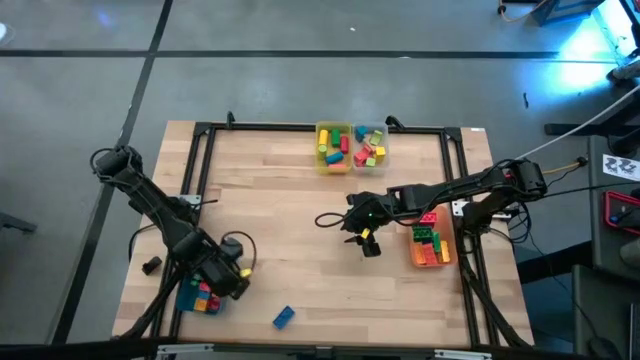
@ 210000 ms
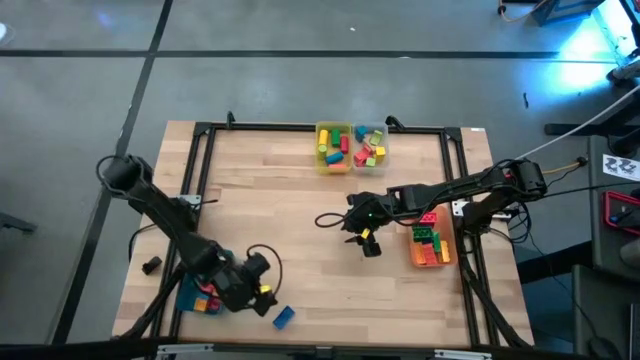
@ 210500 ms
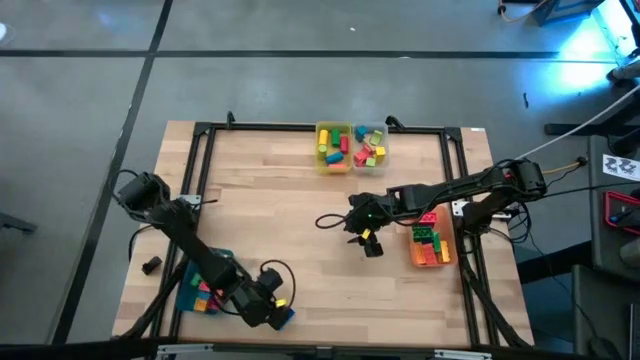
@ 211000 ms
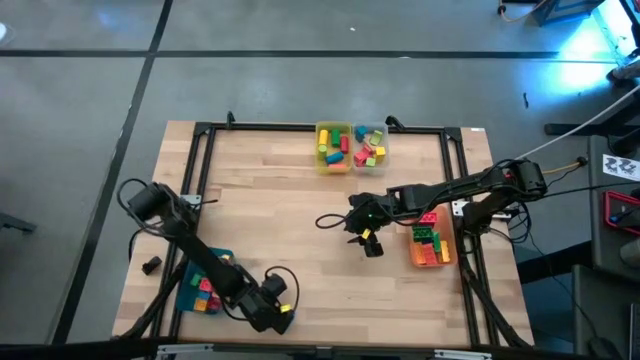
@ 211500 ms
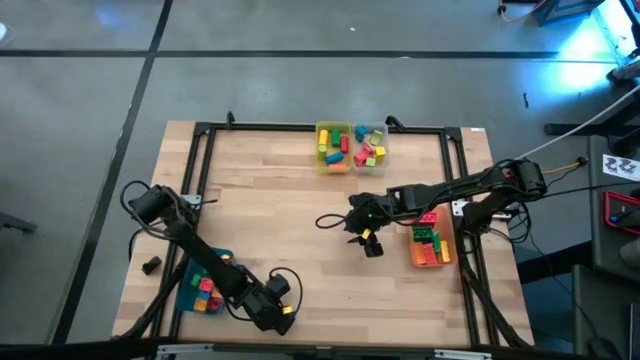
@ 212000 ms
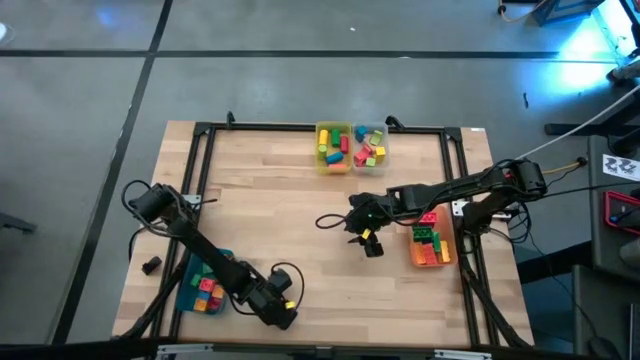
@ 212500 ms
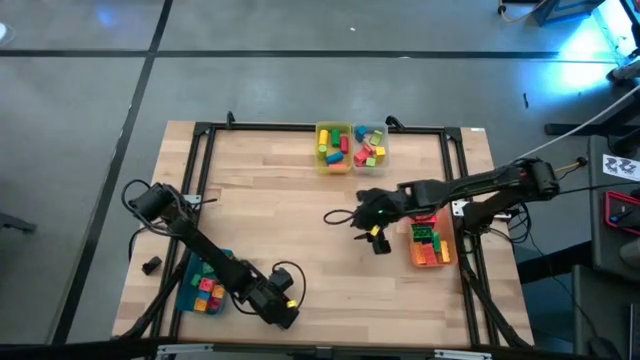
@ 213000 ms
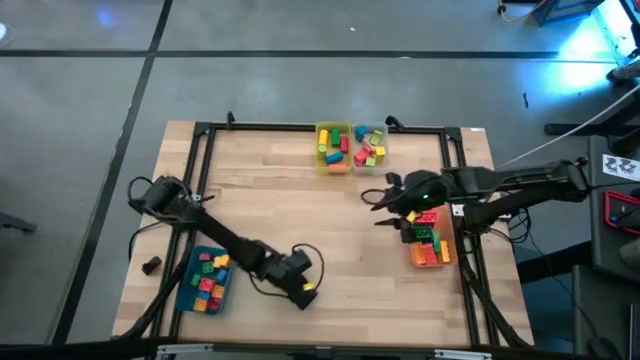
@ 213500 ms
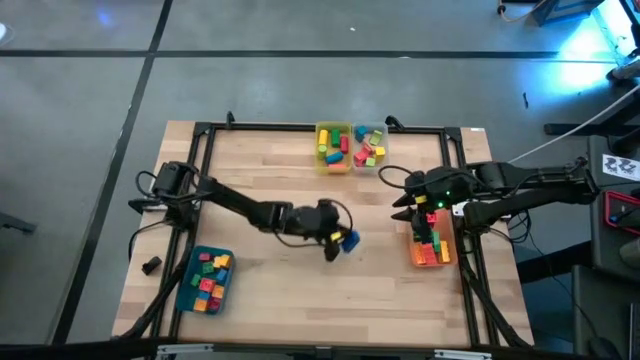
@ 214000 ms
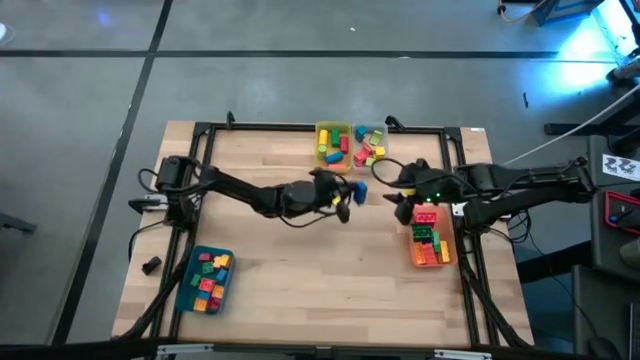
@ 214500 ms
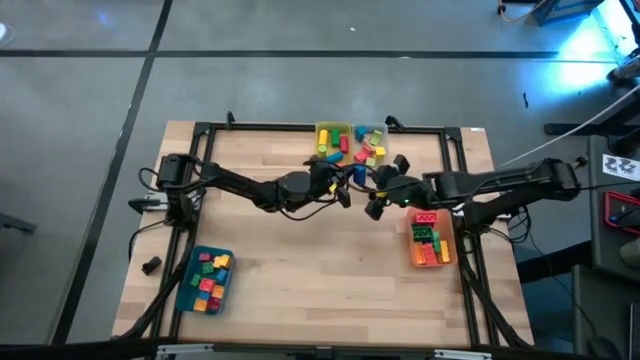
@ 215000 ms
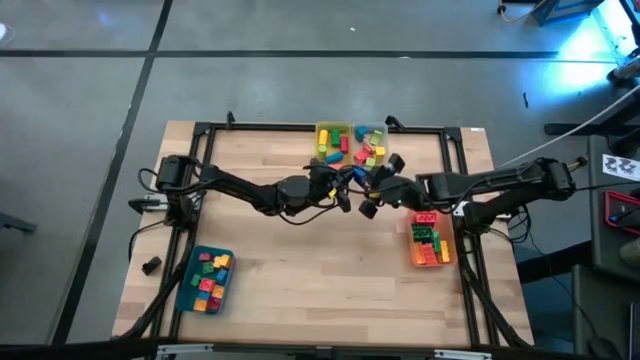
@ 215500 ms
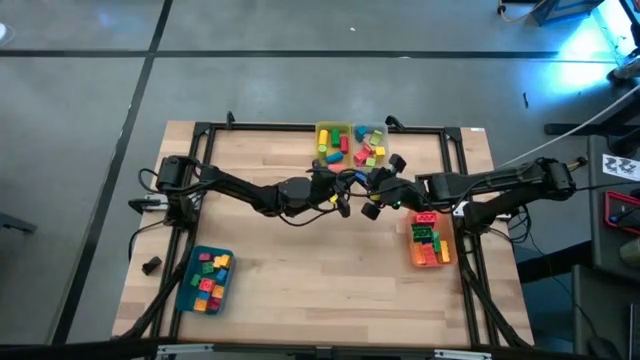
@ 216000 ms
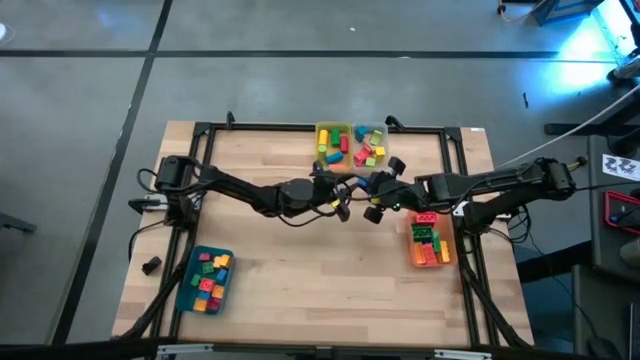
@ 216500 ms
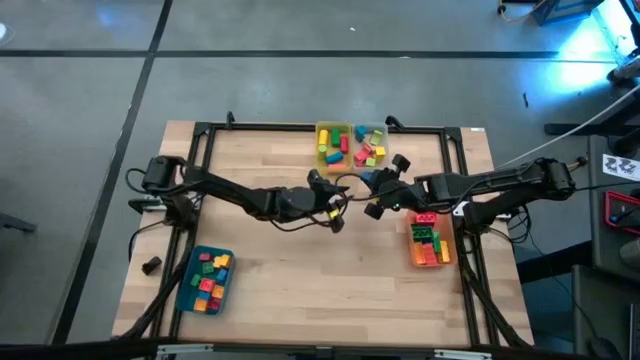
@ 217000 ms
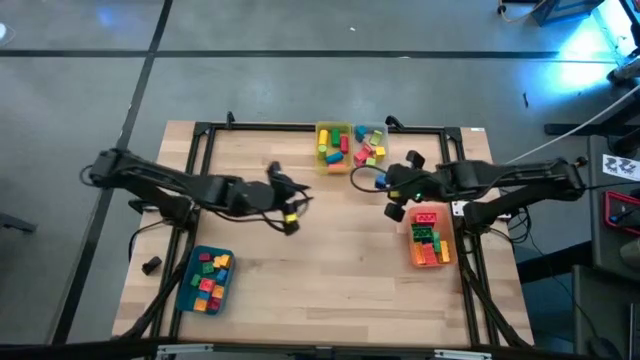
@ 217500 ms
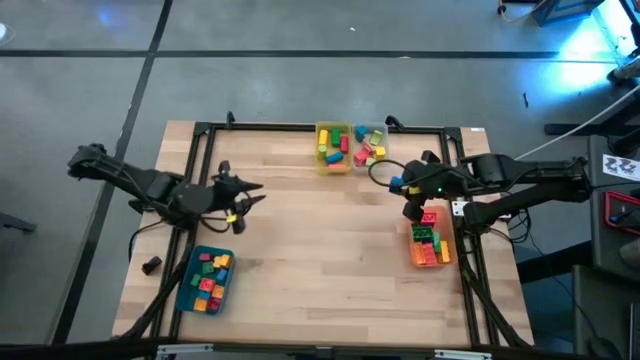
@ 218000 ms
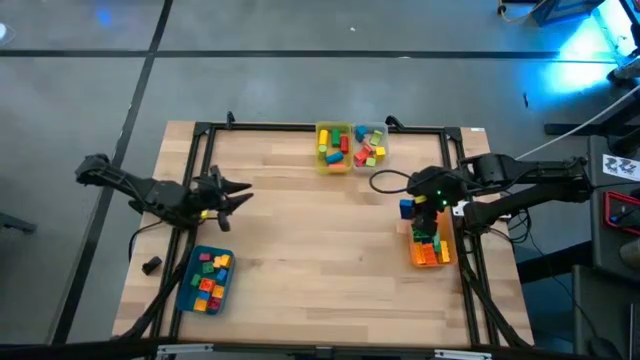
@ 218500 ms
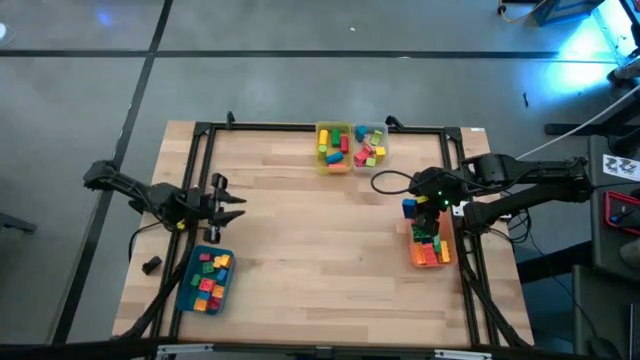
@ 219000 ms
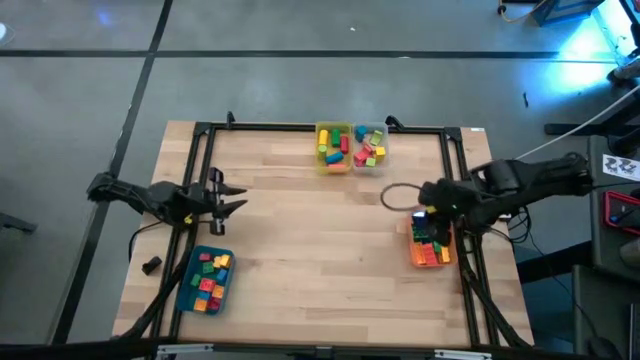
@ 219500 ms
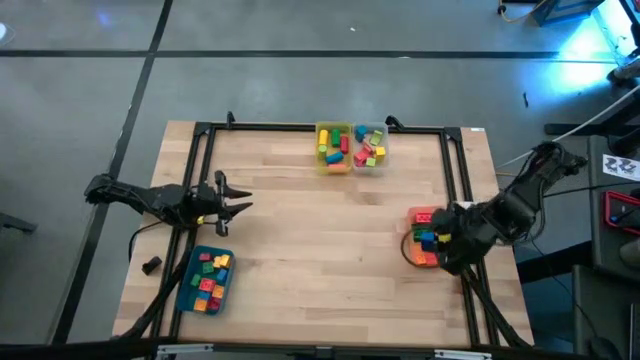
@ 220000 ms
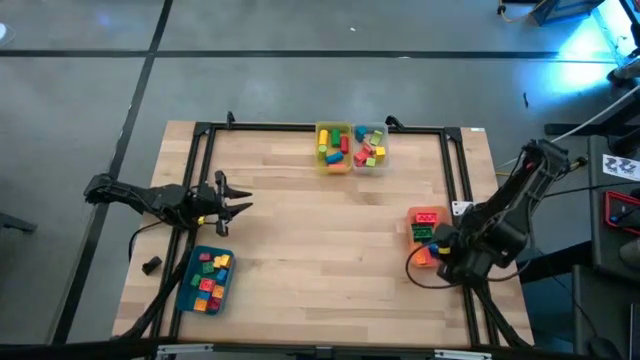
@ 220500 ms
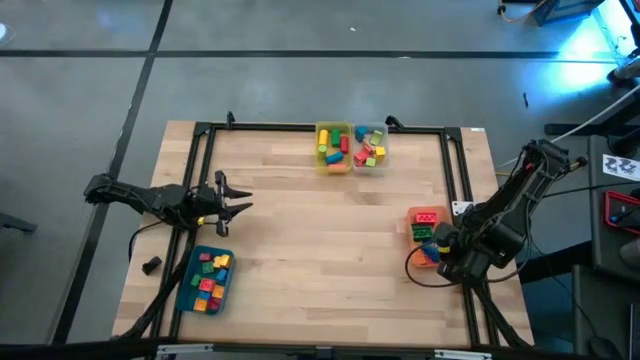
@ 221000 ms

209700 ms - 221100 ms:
Task: Sort blocks by size
Put the blue rectangular game piece into the orange bin

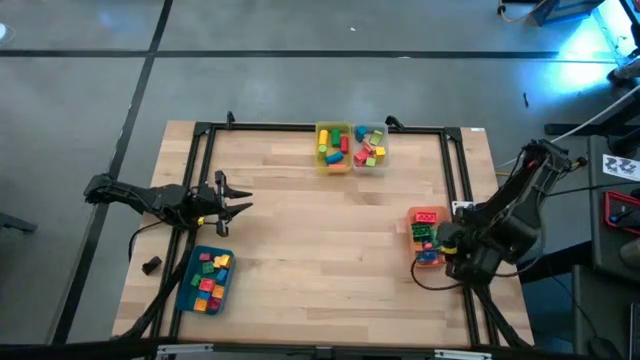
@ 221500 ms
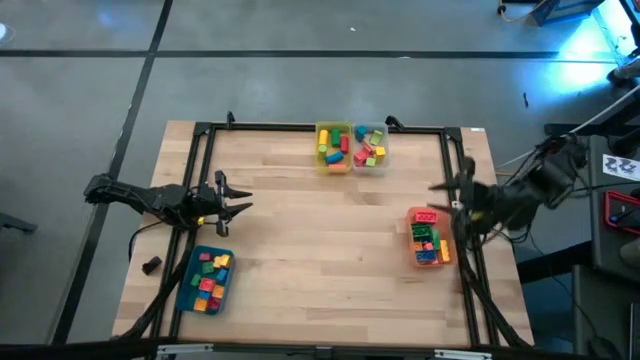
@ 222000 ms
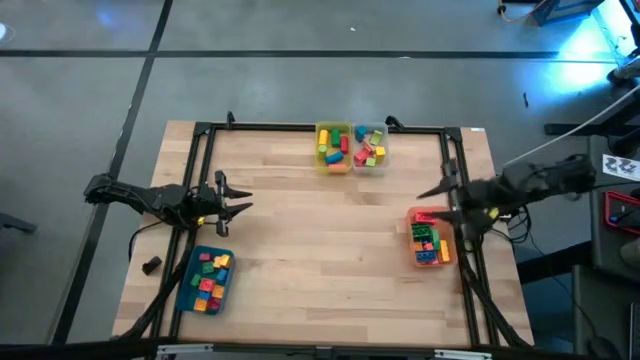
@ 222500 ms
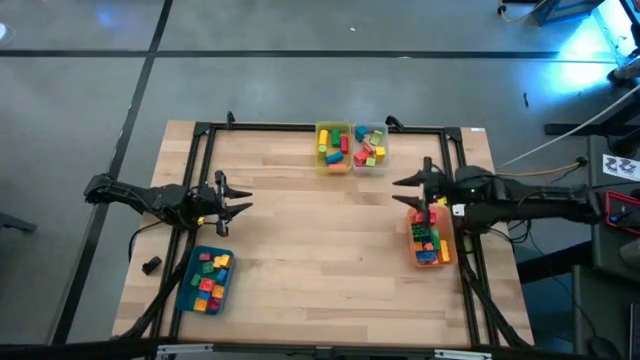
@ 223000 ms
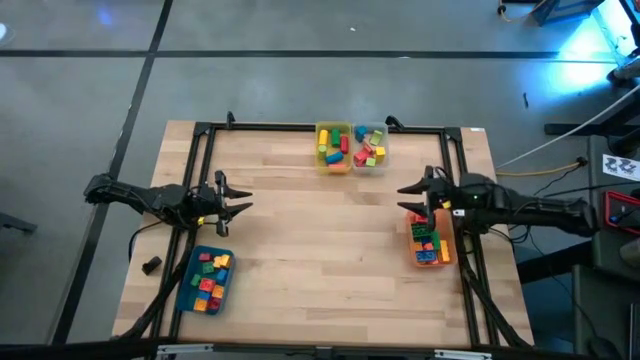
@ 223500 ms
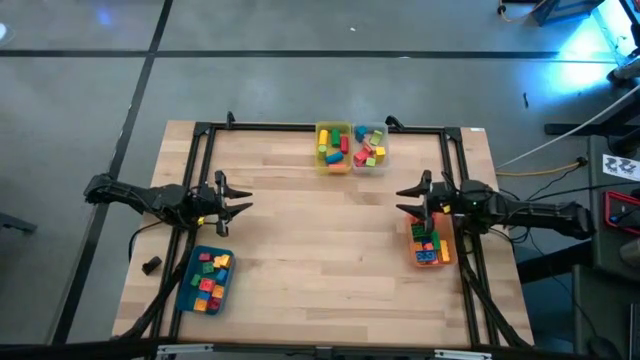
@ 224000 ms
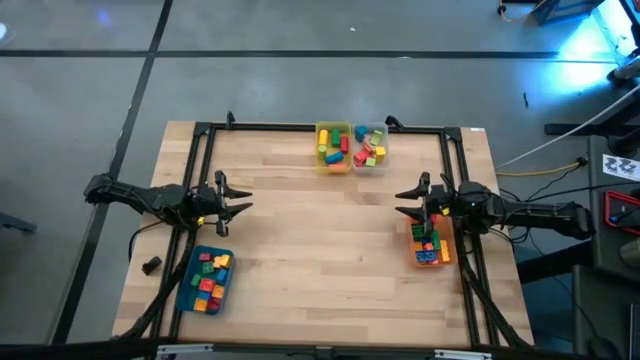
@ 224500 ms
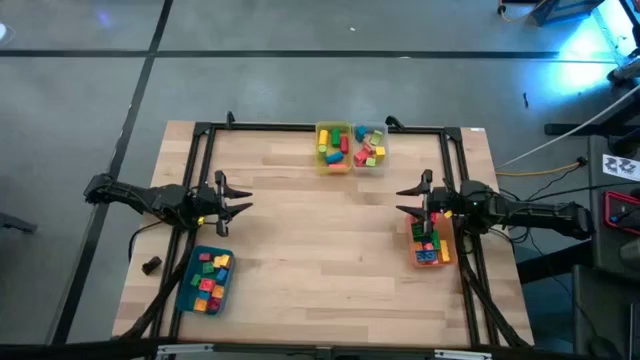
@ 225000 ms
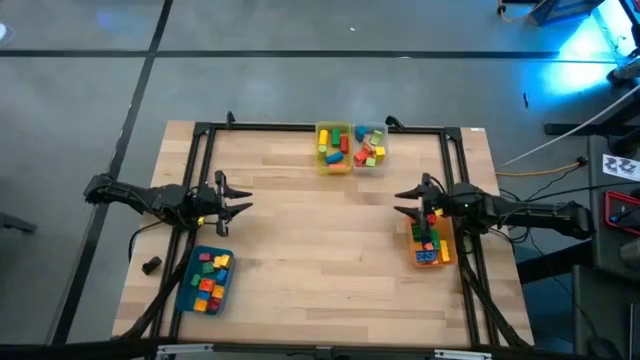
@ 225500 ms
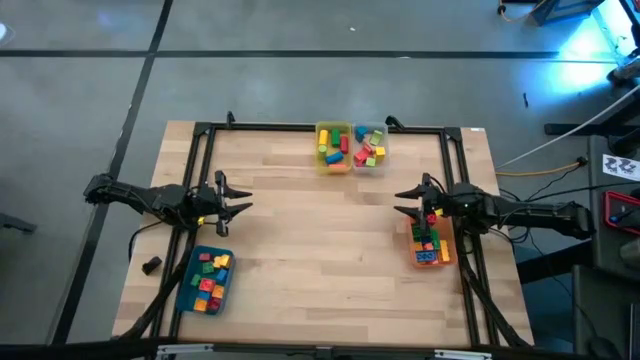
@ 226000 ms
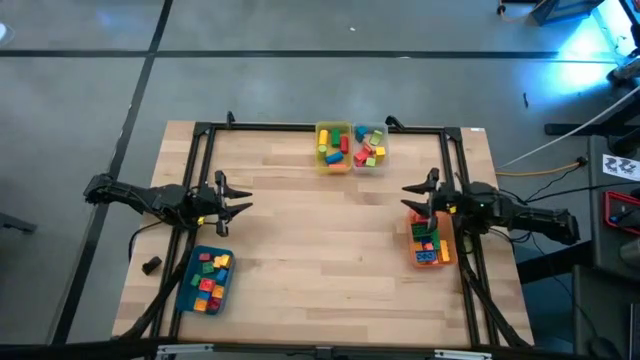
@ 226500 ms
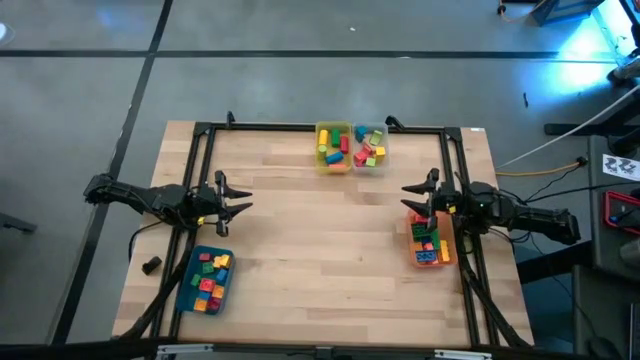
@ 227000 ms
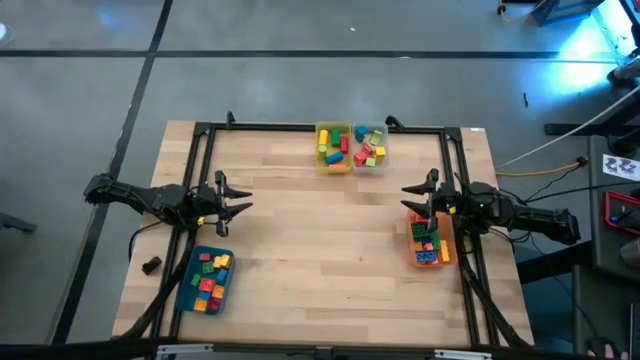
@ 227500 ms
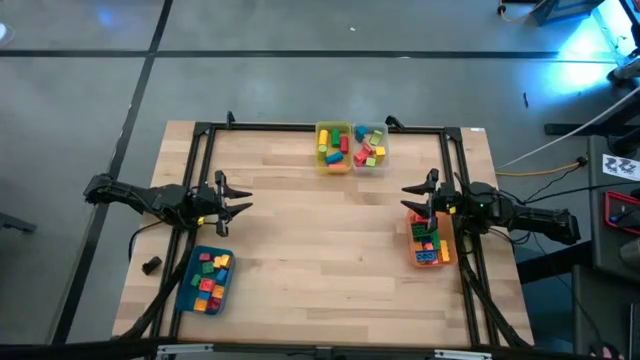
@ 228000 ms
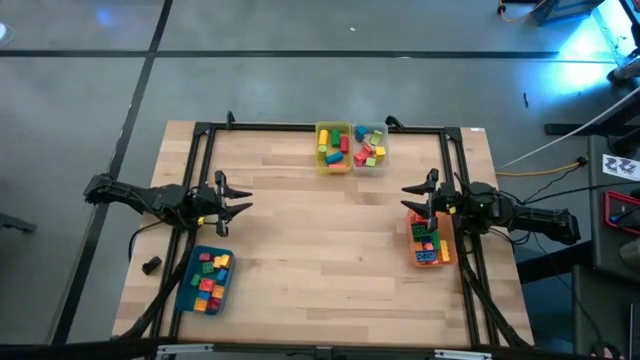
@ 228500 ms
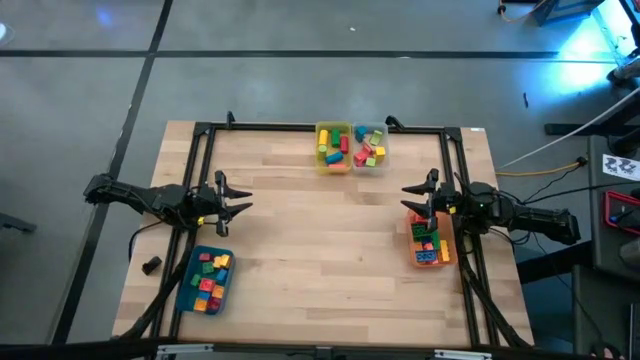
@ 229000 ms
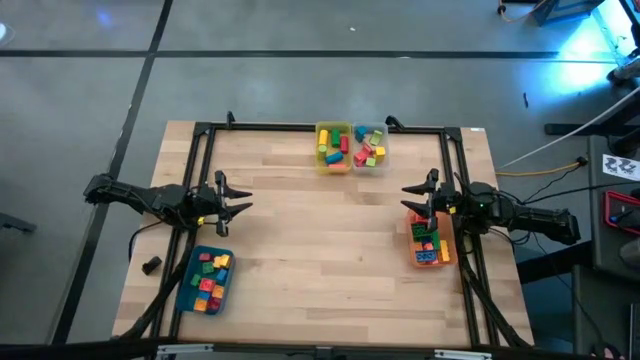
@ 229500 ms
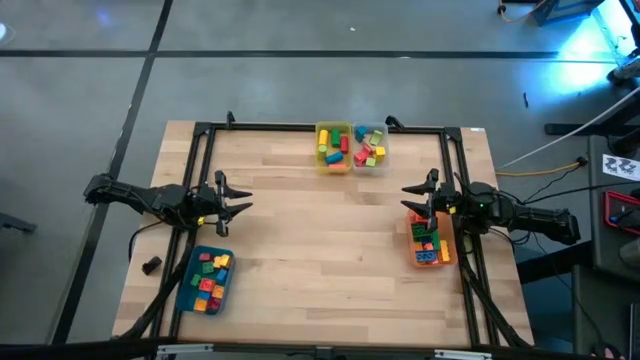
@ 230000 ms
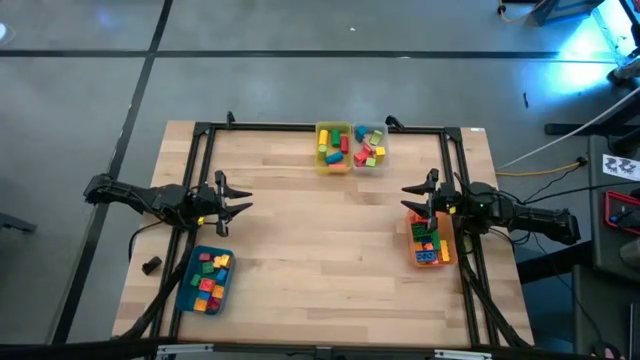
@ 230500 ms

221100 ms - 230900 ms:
Return to Home Position
